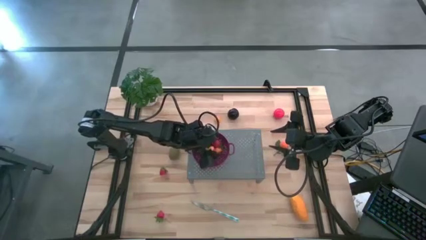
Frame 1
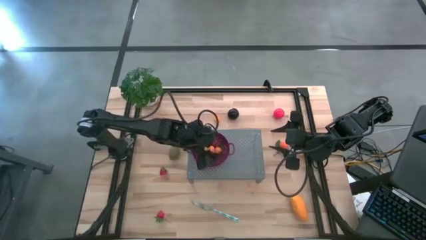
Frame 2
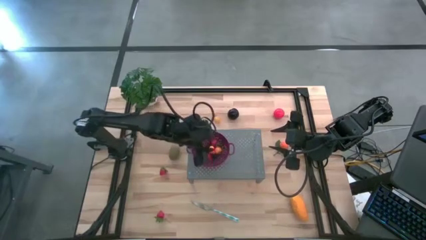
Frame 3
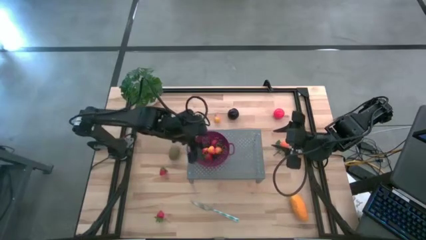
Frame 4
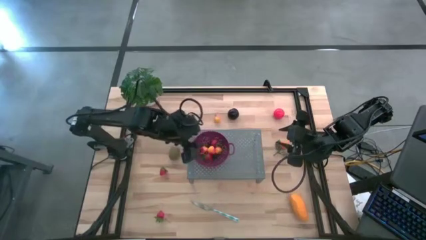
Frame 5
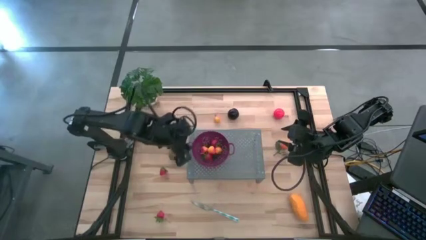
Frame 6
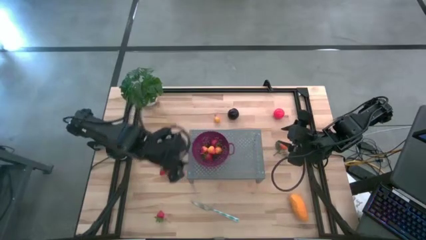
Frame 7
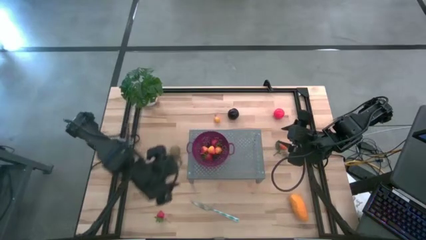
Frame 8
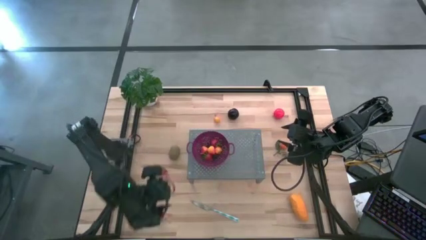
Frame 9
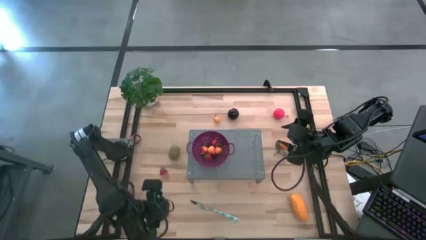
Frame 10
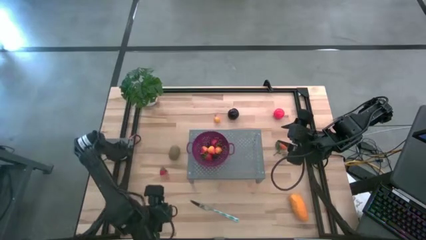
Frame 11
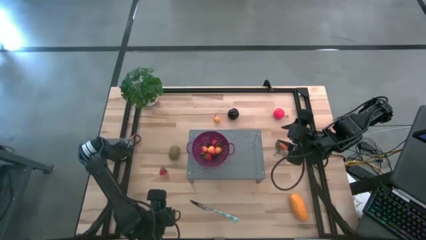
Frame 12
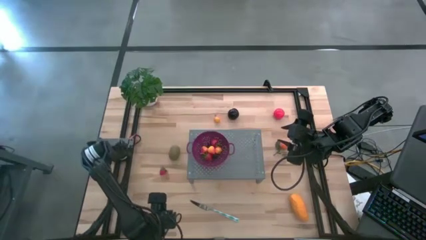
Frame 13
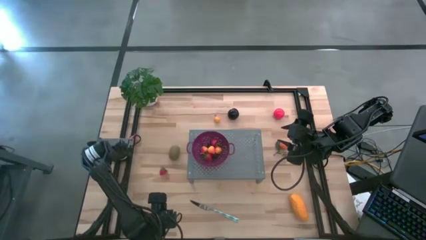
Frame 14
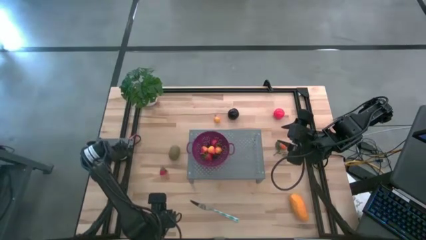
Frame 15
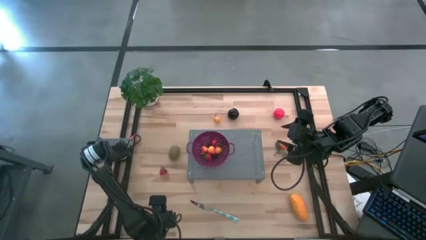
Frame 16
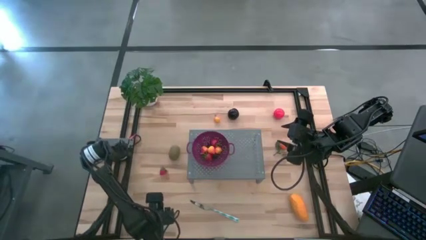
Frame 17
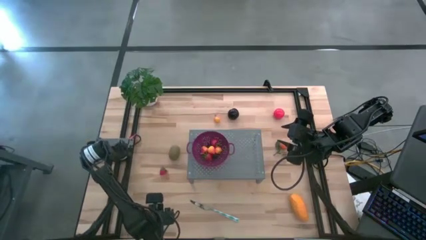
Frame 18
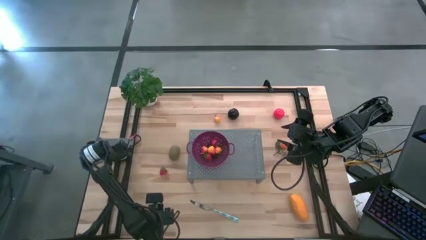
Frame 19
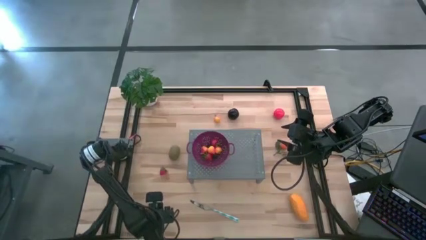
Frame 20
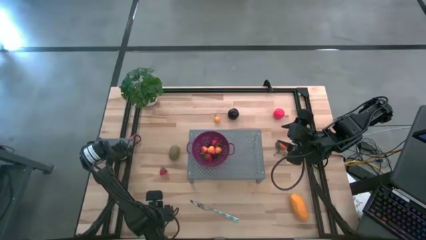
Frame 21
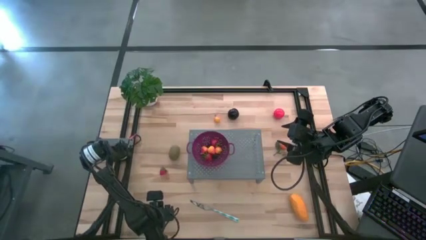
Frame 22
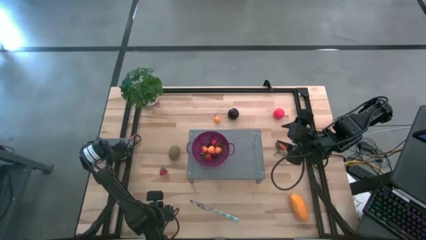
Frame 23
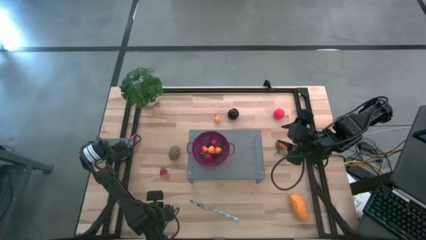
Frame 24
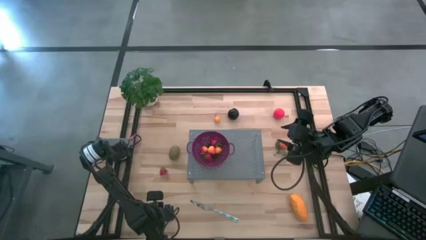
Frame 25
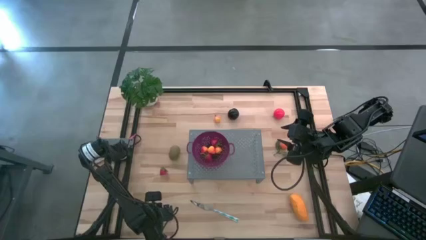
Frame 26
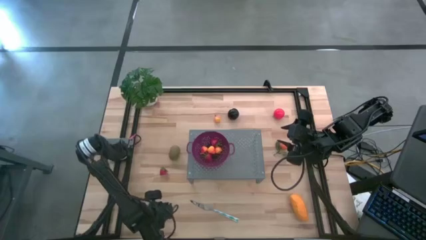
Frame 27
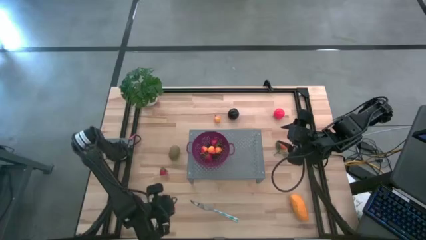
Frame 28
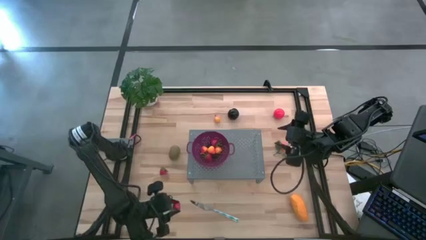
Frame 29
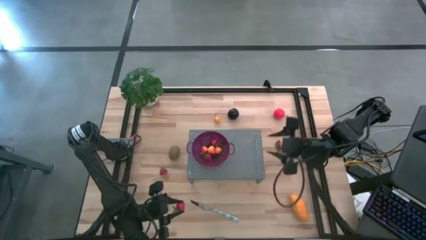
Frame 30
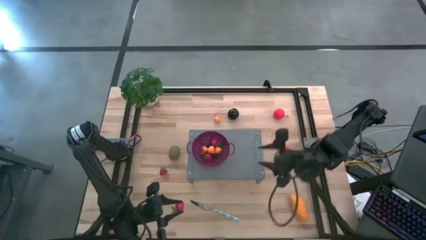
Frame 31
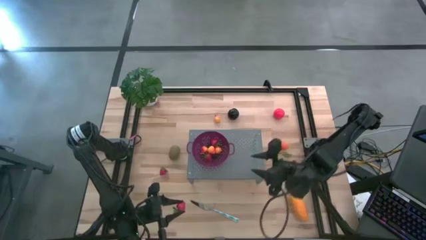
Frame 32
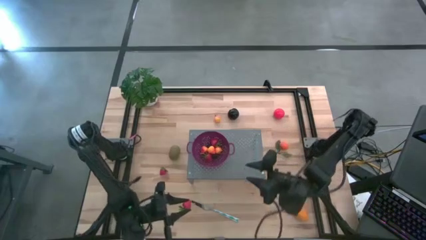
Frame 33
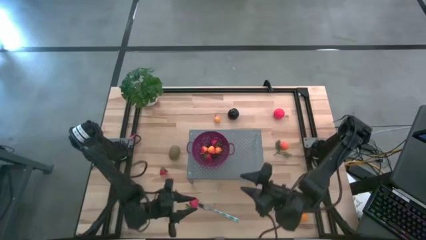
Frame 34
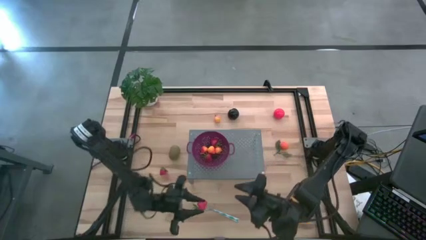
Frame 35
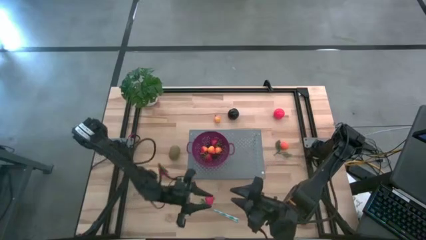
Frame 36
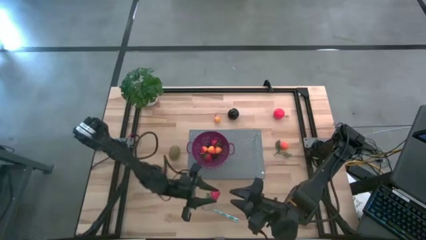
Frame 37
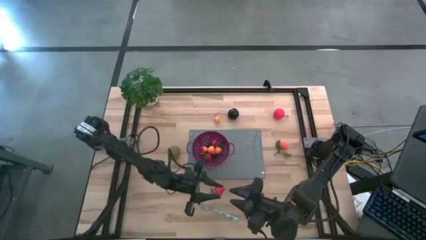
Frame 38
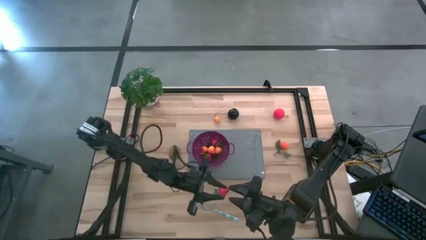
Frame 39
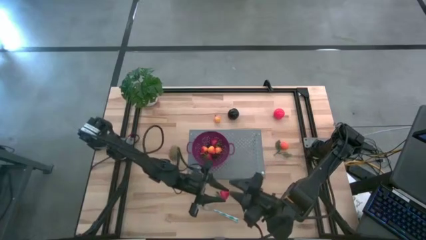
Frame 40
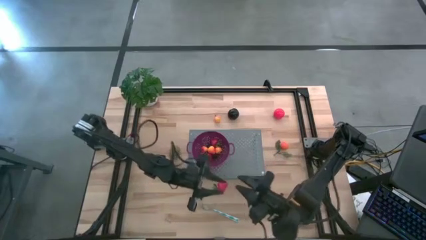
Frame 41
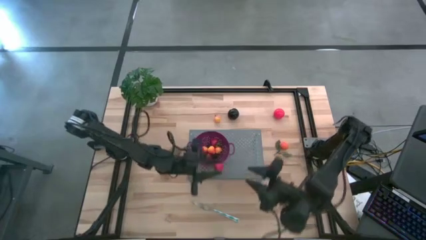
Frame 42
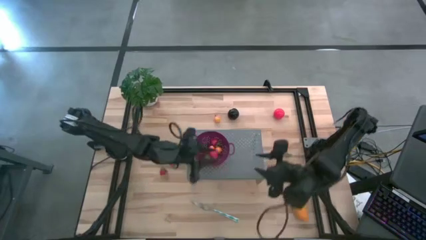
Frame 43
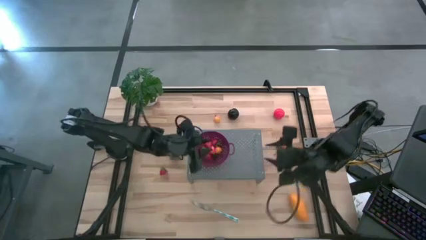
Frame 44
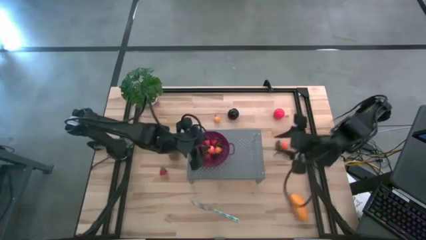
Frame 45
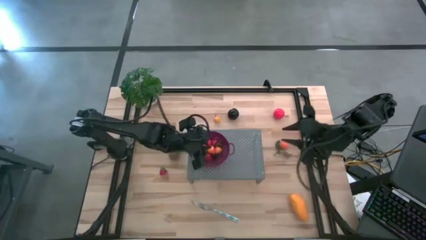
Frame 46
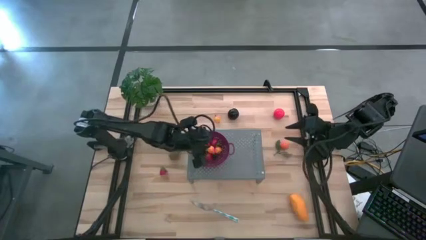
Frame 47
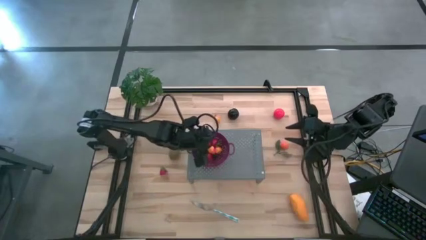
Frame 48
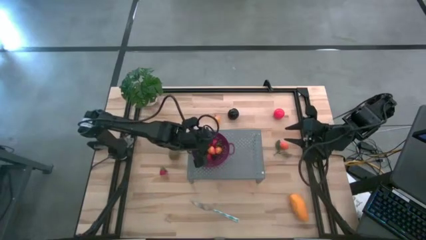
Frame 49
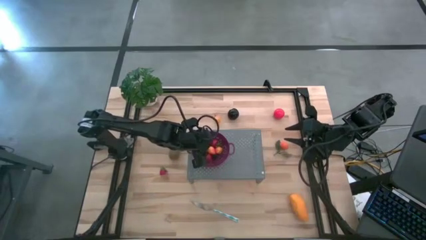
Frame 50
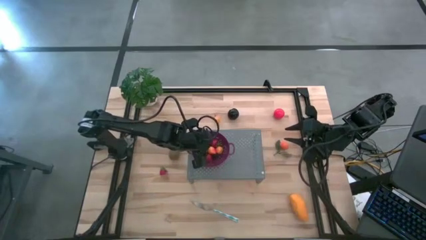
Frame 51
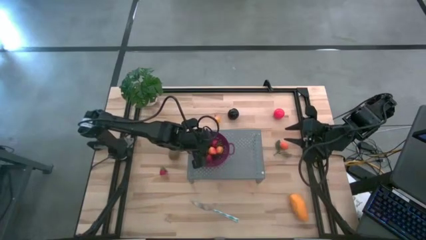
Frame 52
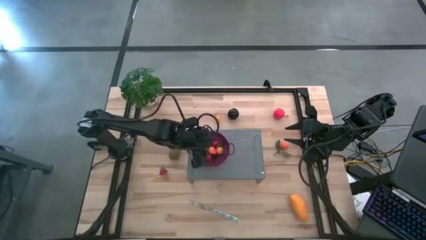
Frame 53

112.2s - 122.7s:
Task: Pick & Place Fruit
Put the strawberry into the purple strainer bowl

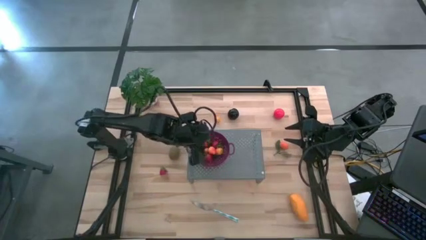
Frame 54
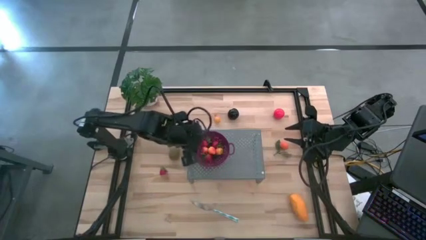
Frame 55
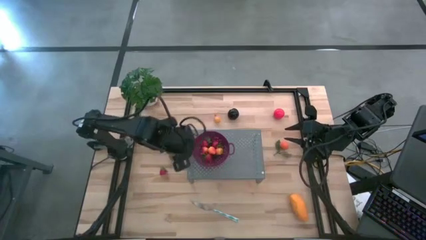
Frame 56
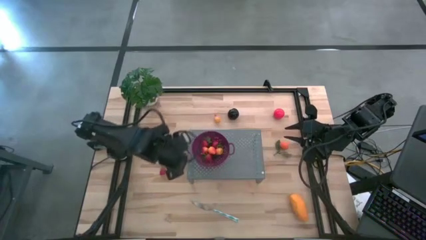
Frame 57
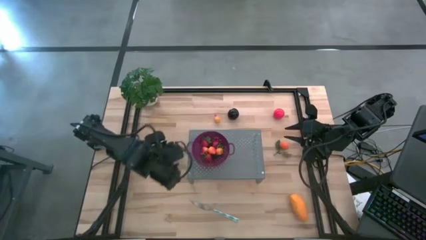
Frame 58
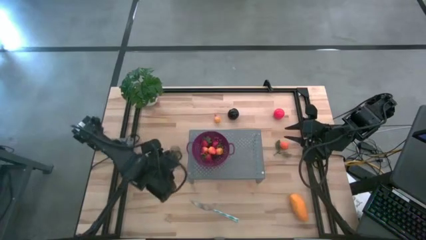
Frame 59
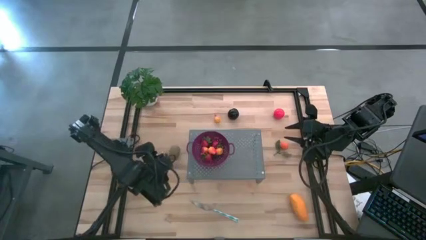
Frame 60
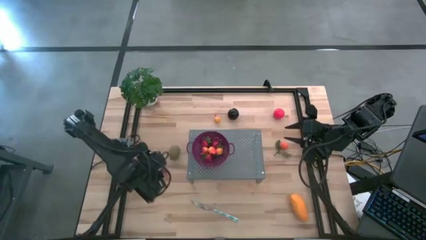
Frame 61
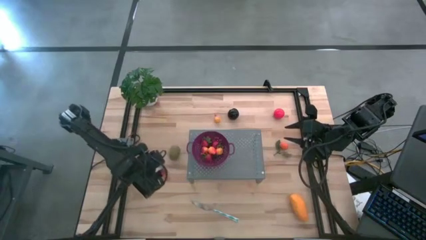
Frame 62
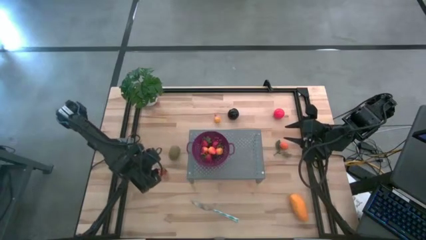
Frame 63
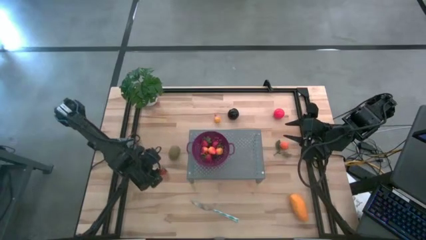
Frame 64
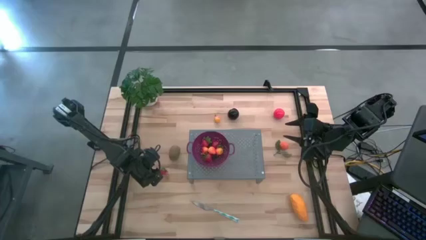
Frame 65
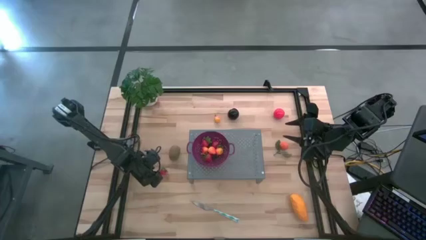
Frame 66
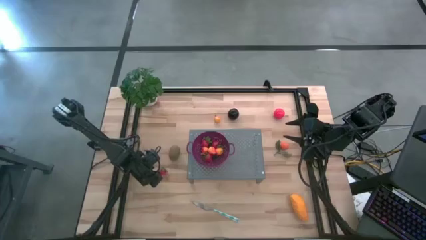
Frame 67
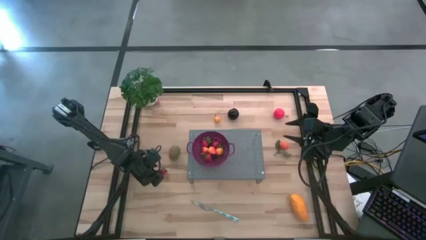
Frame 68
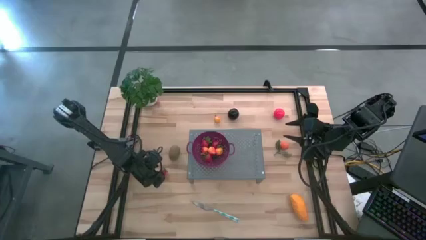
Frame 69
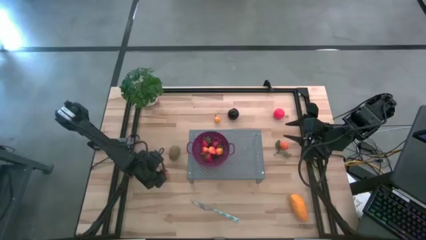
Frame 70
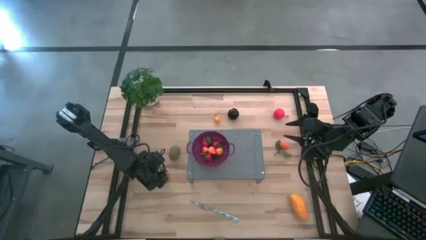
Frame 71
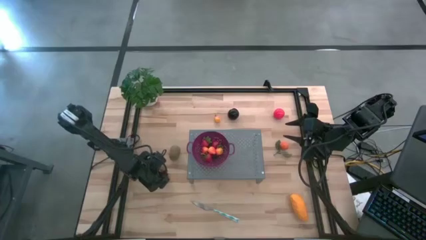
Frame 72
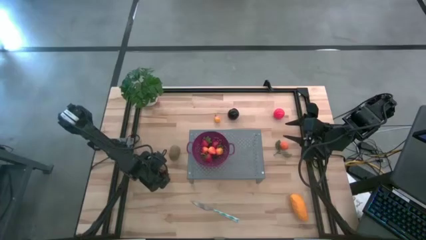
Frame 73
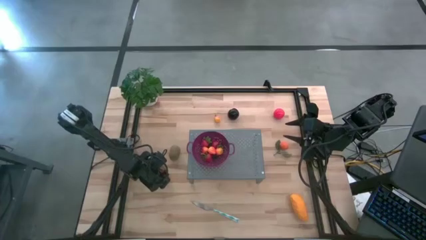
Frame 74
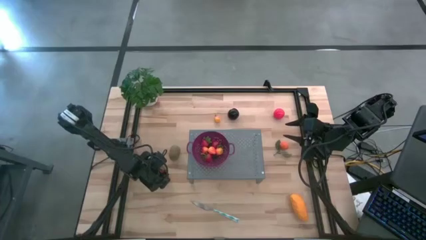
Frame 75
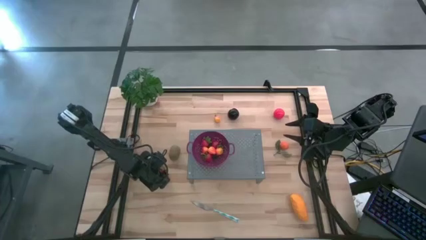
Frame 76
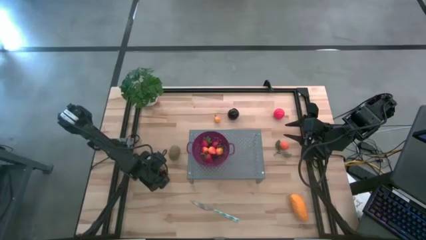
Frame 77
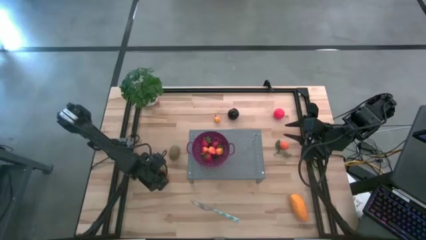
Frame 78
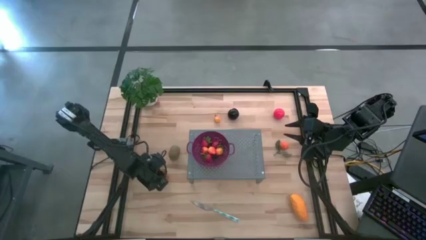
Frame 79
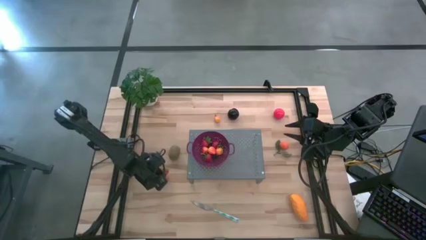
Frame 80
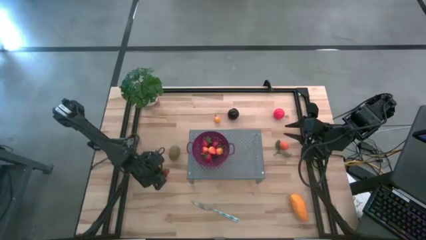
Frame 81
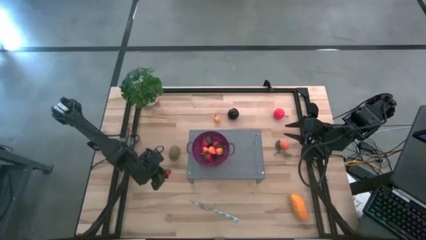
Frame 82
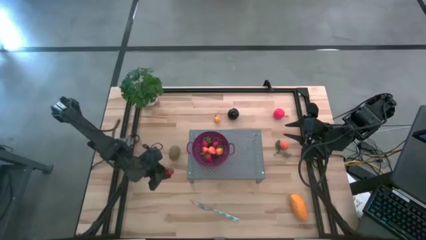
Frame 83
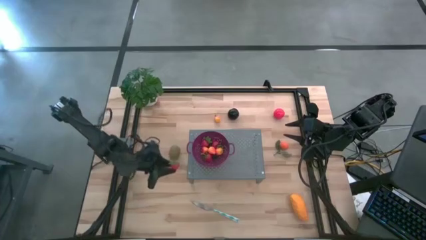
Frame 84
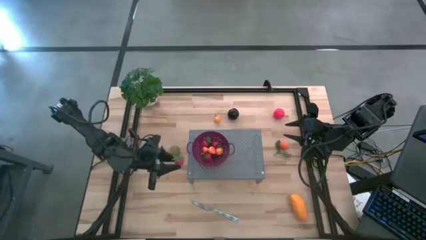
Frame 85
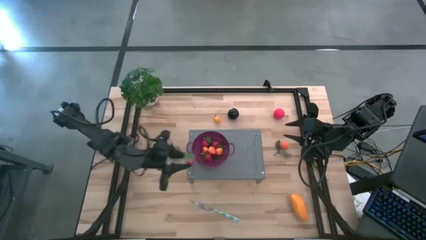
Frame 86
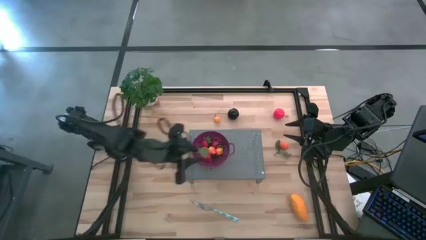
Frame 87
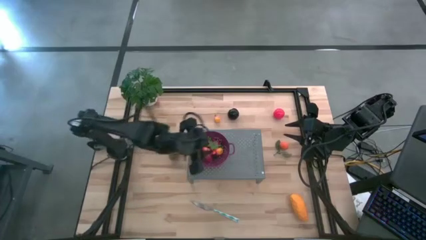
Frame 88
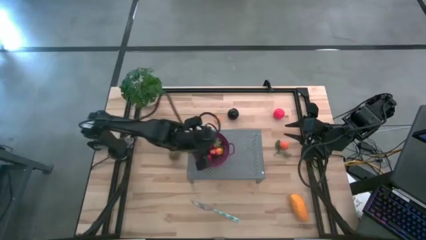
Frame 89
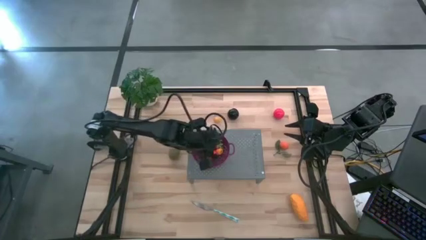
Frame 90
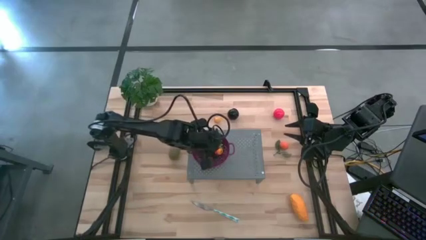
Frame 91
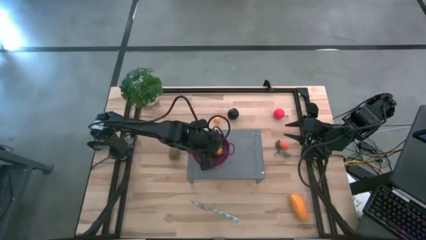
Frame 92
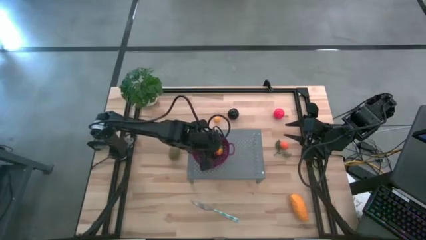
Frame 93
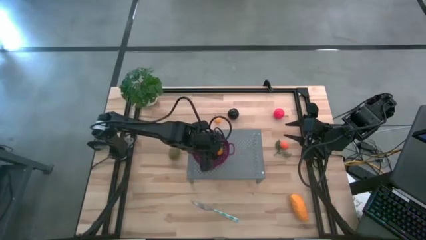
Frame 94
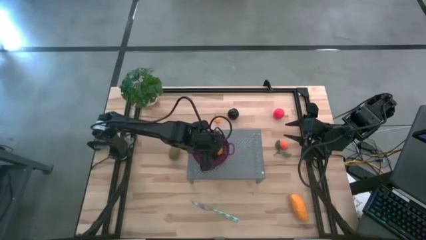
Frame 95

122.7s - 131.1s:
Put the strawberry into the purple strainer bowl
